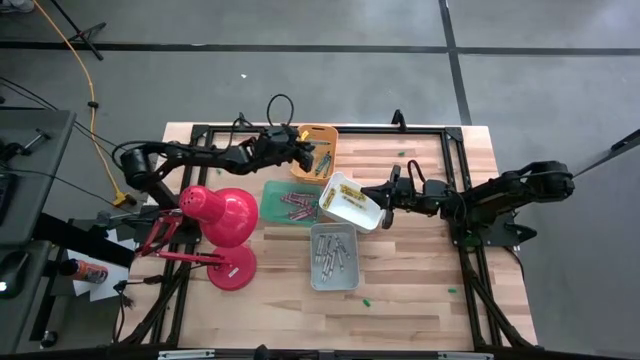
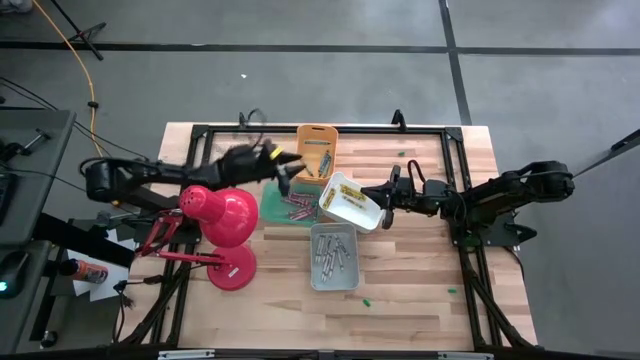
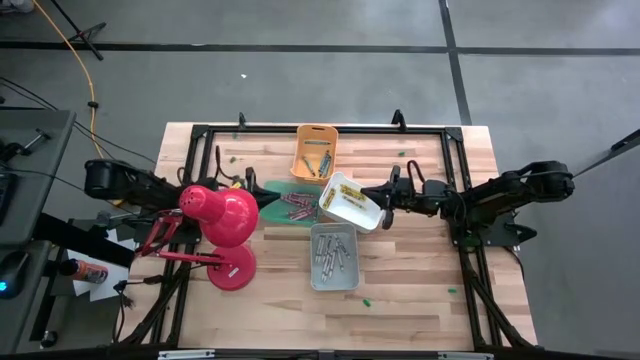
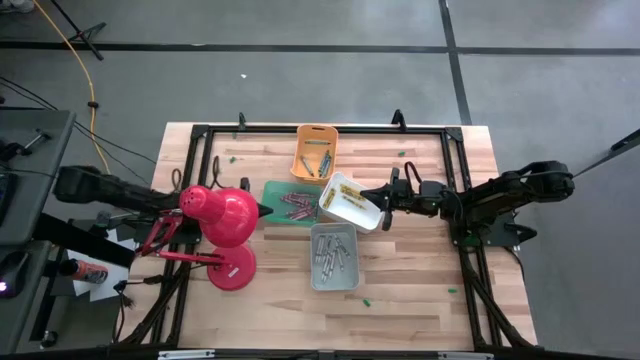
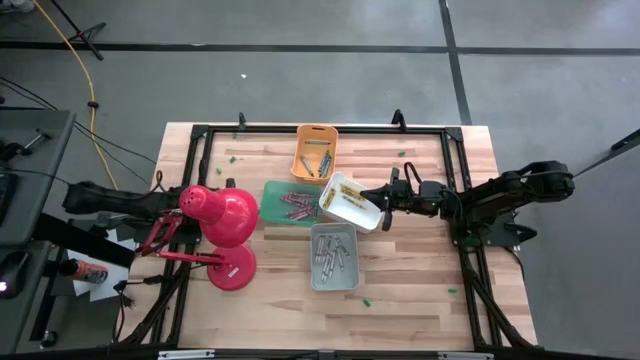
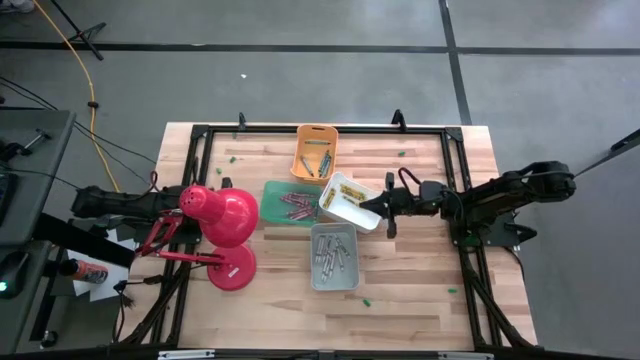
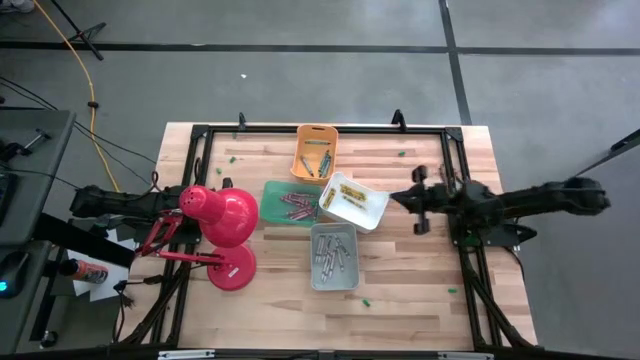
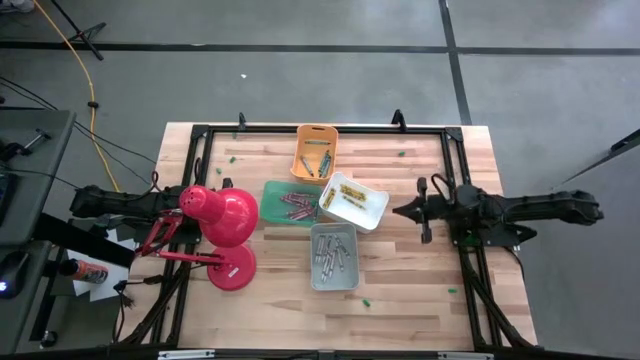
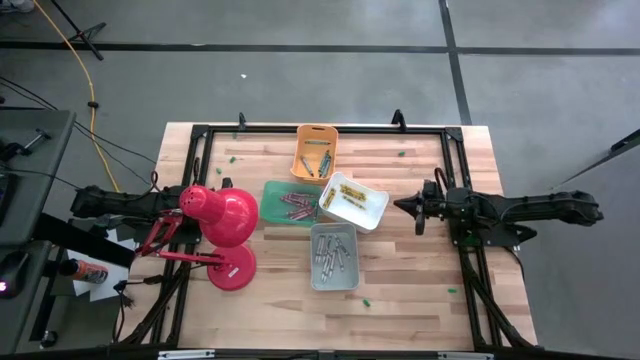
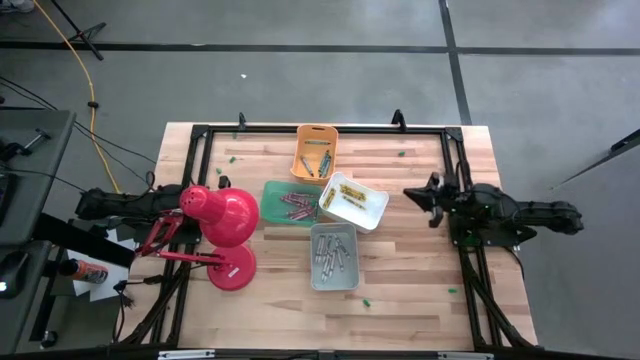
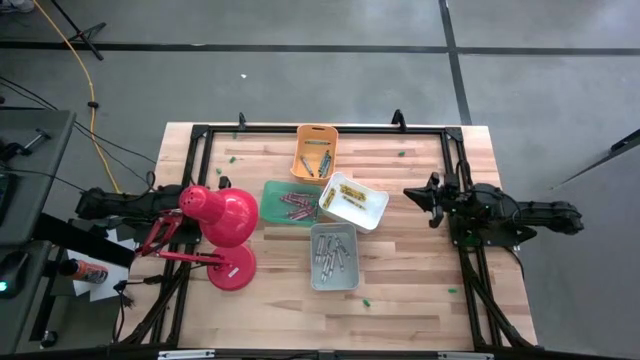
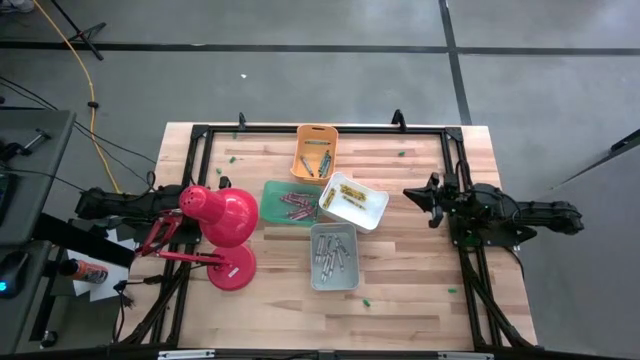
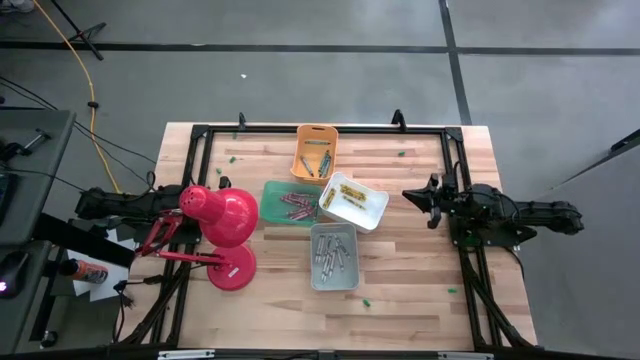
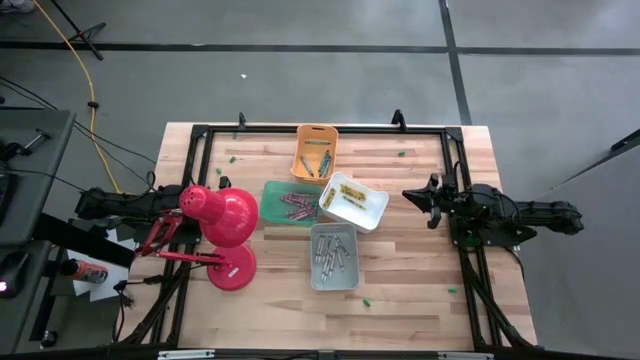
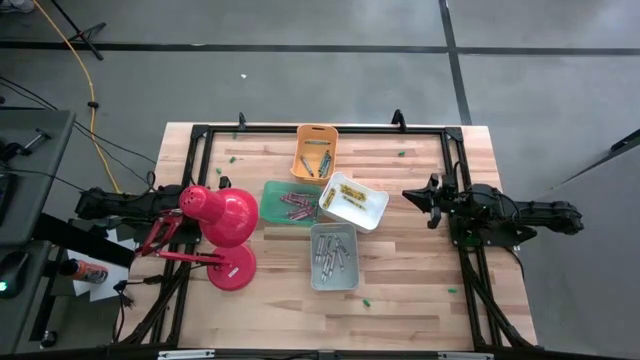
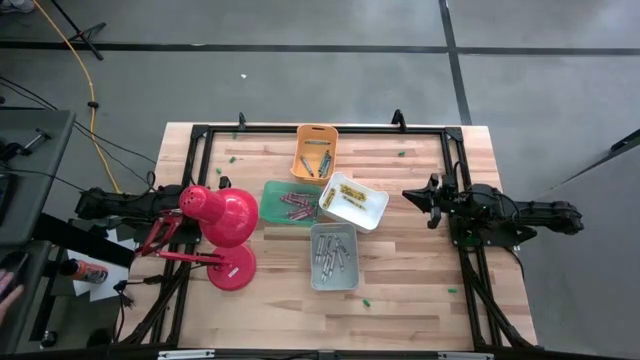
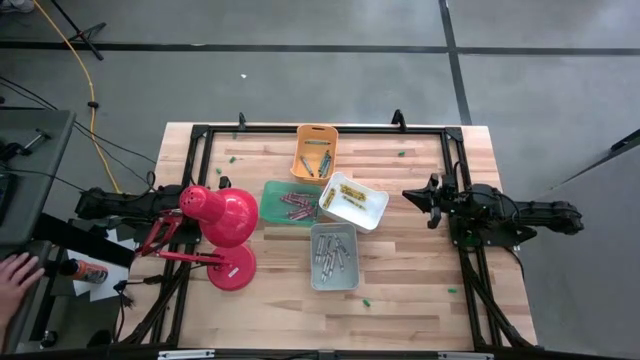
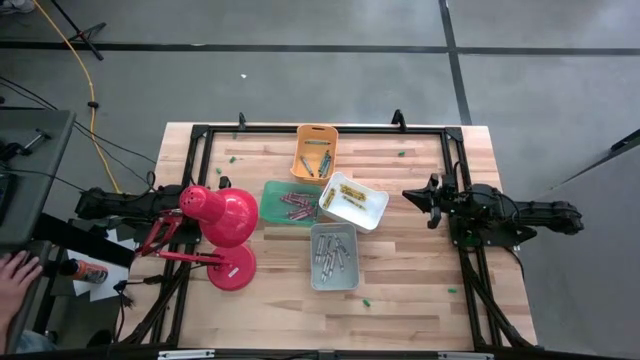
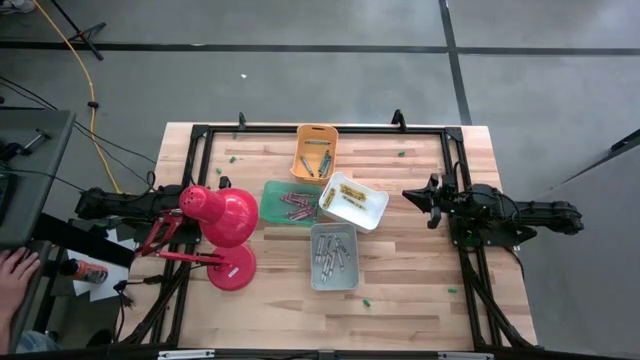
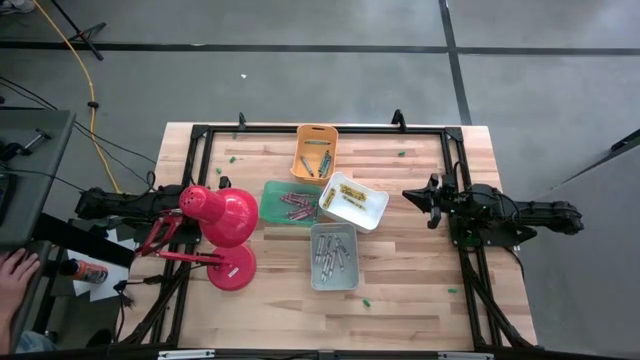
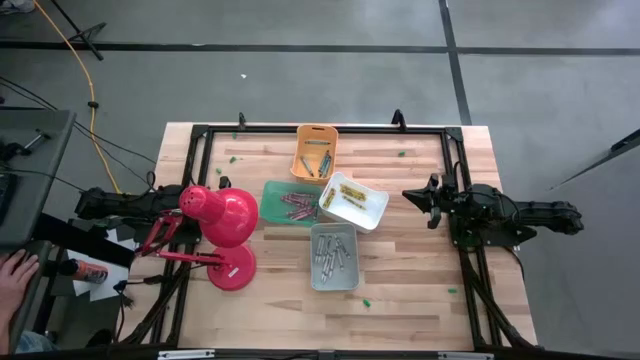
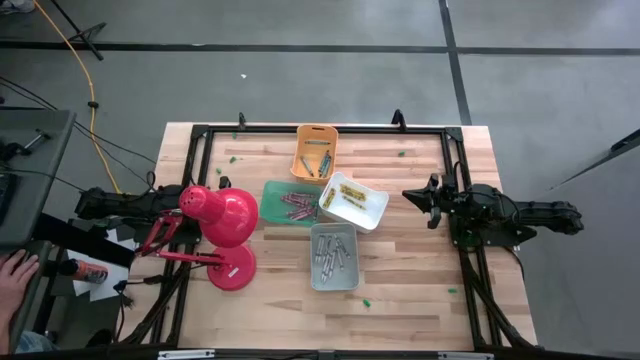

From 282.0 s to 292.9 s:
Task: Sort crayons
Return to Home Position

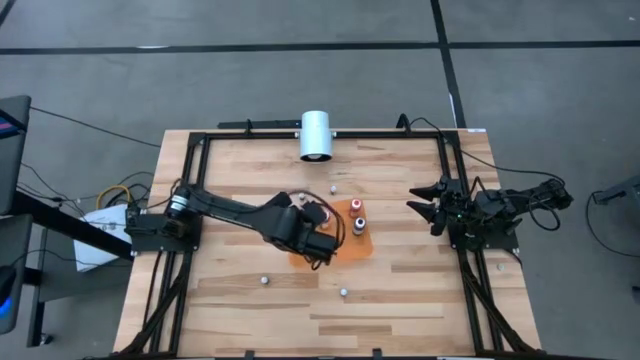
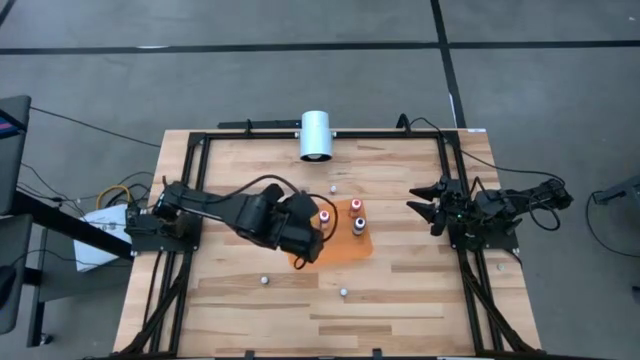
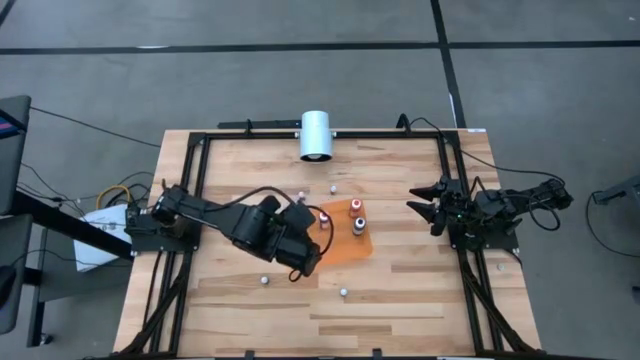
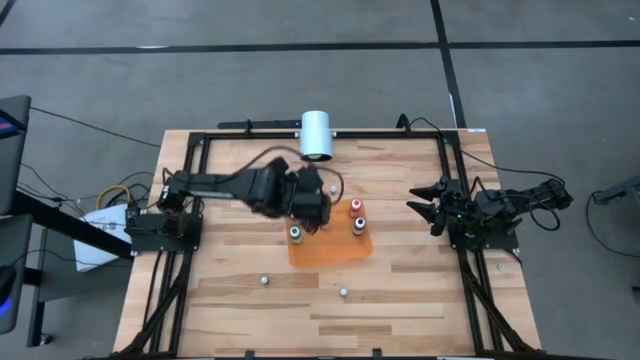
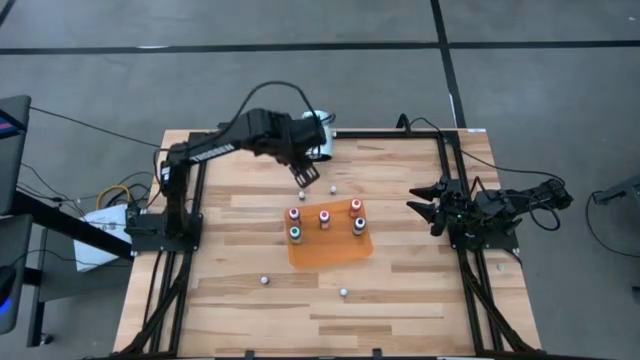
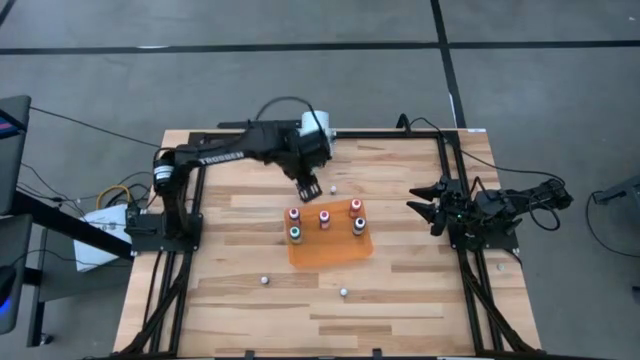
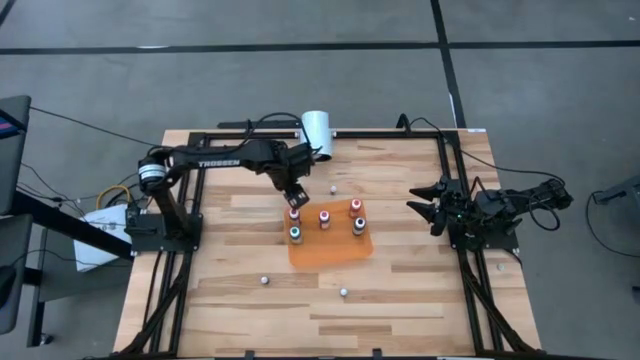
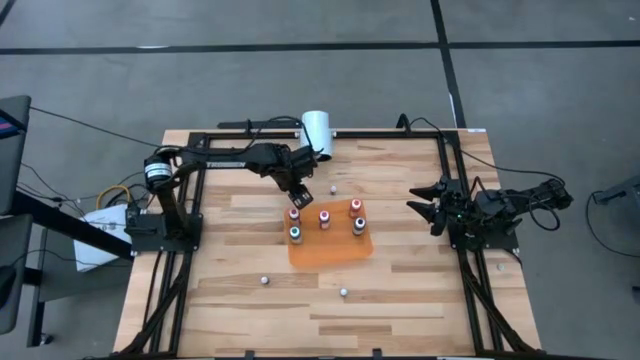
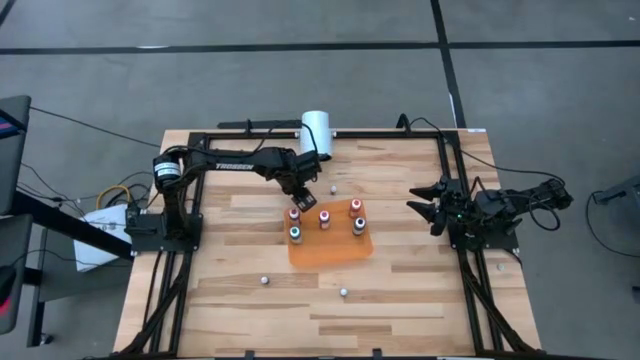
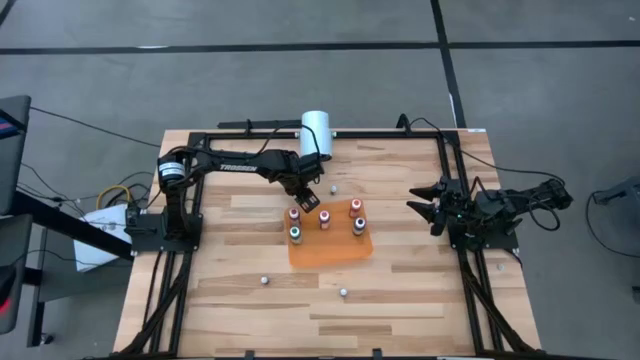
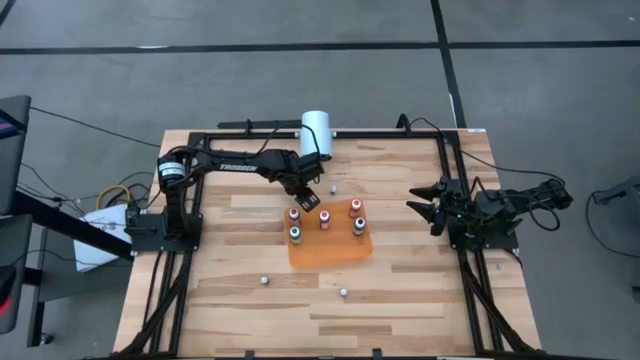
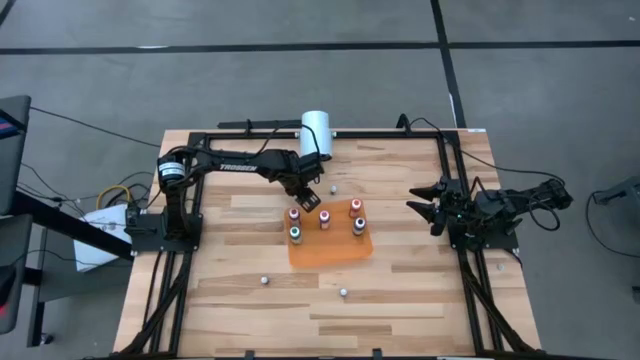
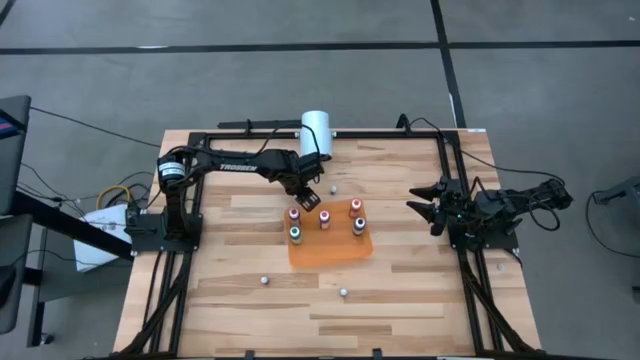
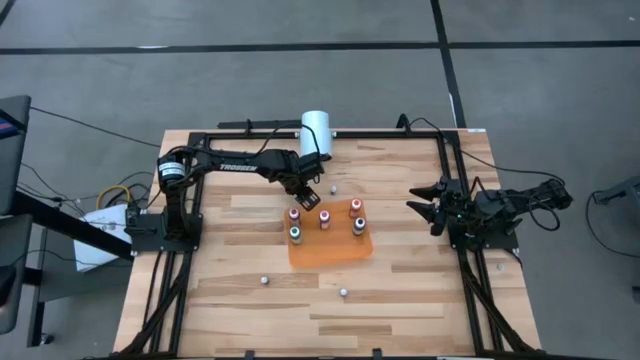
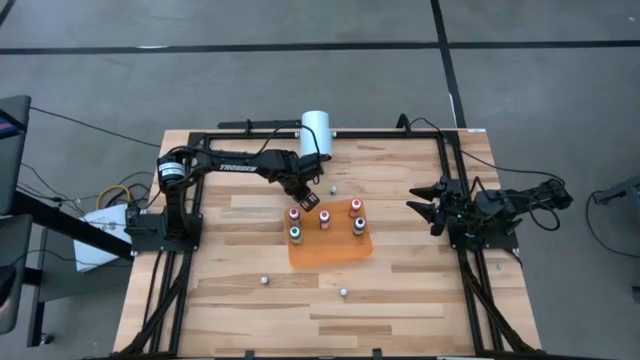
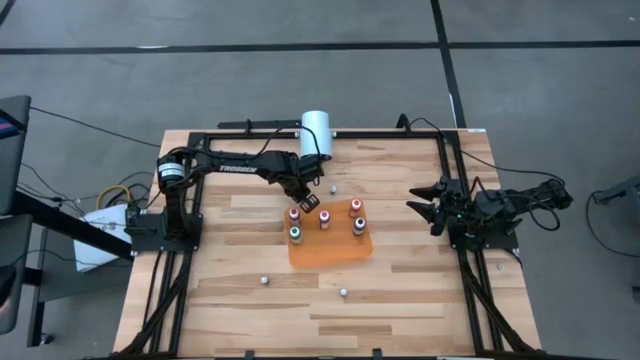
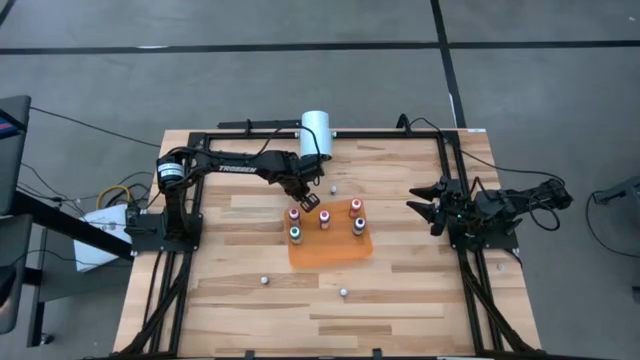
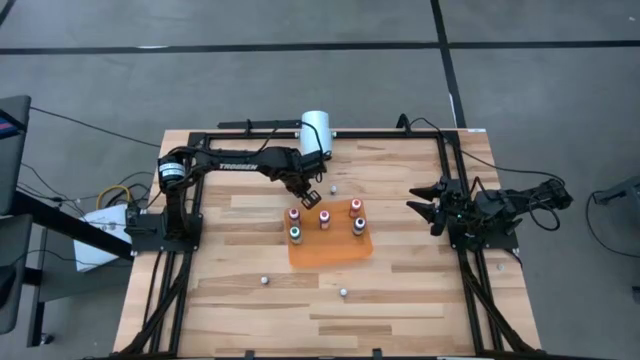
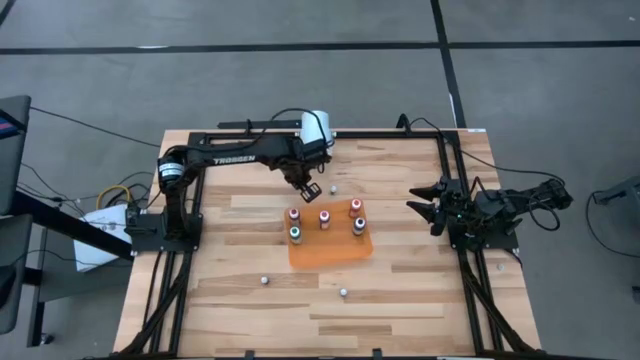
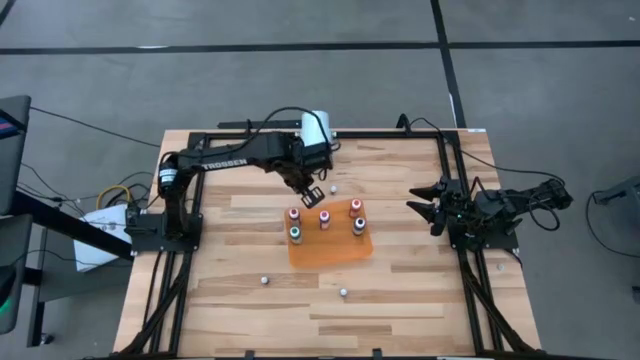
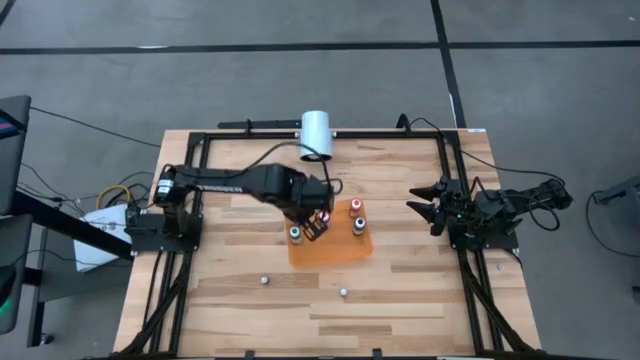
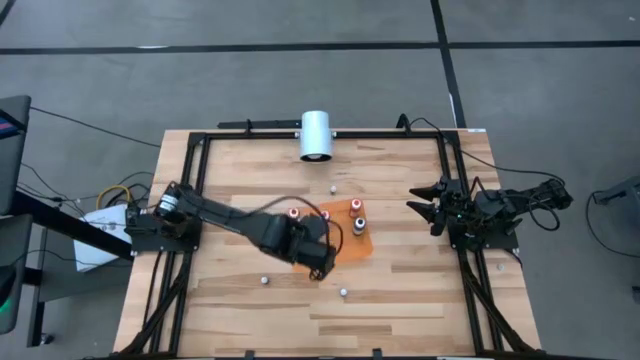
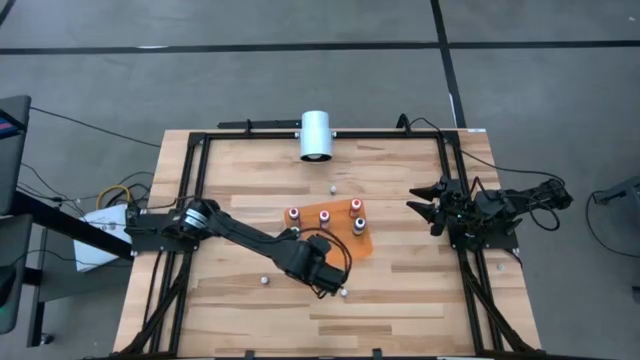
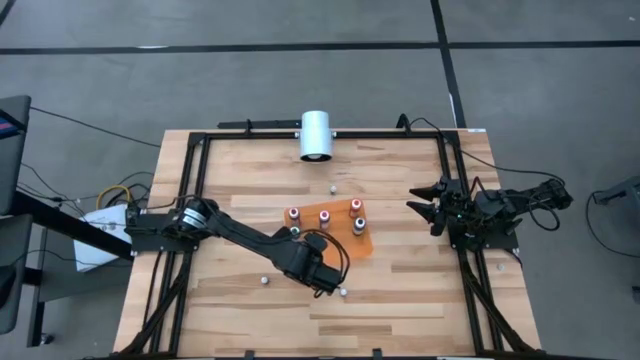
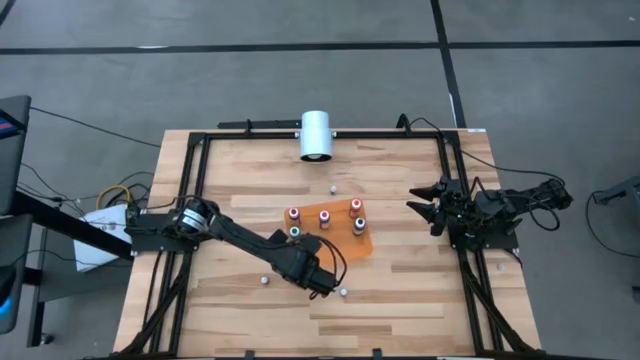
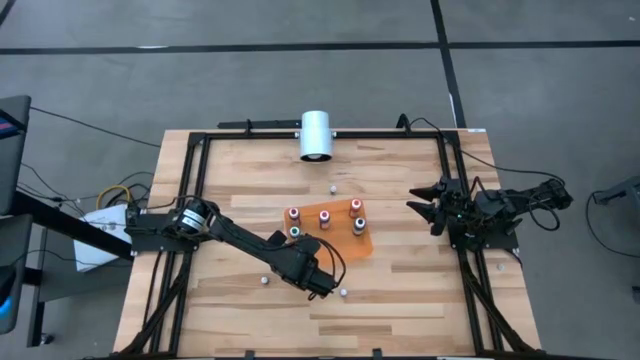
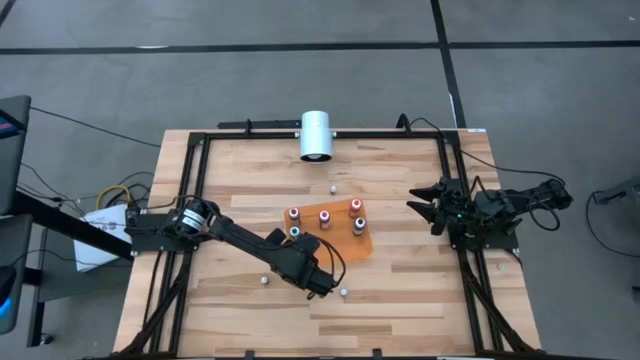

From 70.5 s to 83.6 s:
Task: Pick & Place food coloring
Put the top small green food coloring bottle into the orange container
